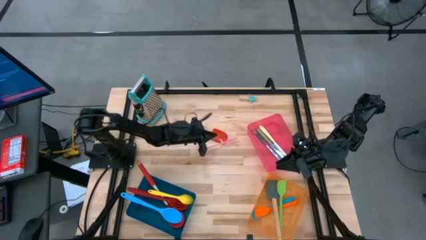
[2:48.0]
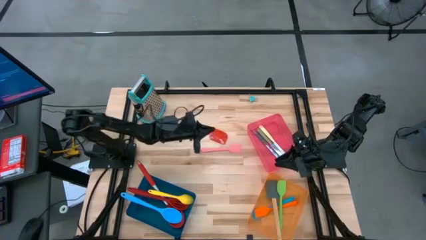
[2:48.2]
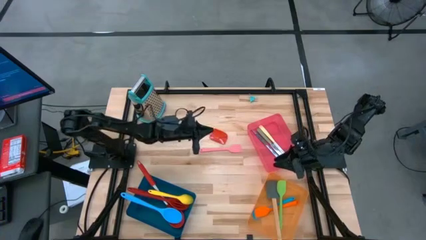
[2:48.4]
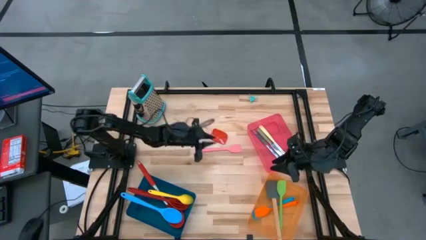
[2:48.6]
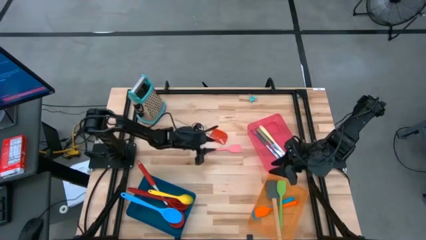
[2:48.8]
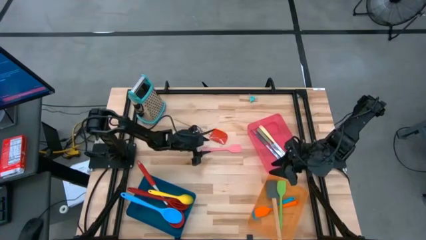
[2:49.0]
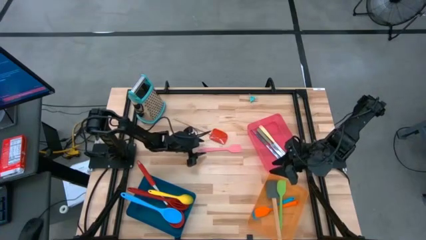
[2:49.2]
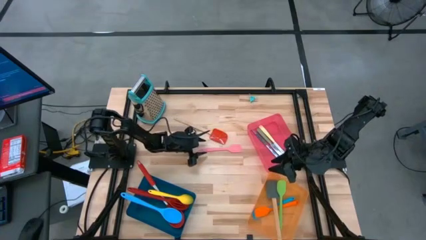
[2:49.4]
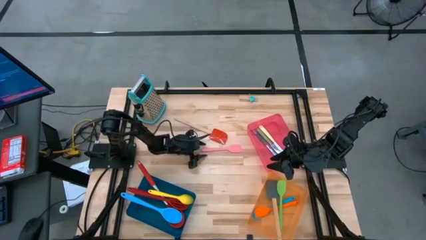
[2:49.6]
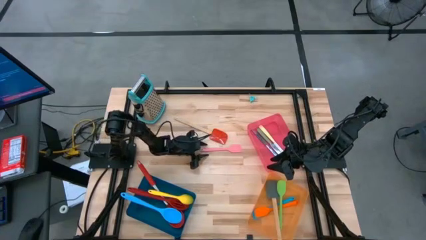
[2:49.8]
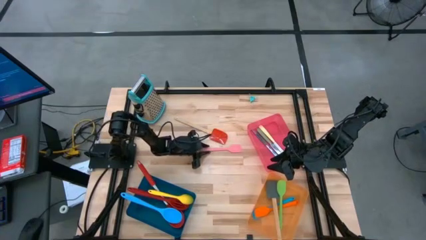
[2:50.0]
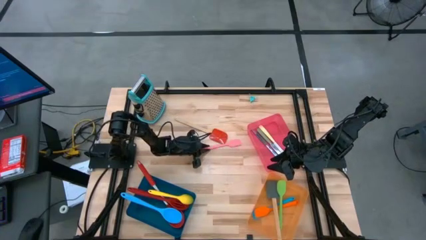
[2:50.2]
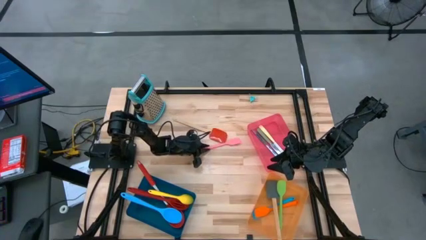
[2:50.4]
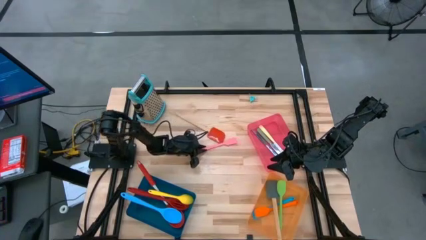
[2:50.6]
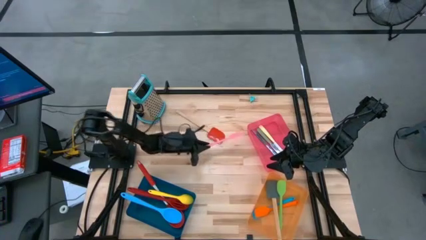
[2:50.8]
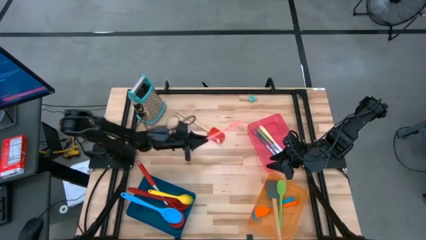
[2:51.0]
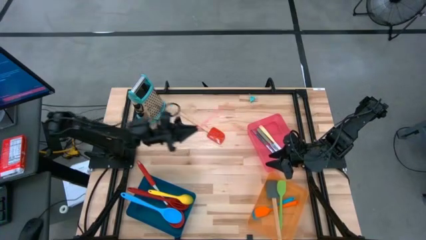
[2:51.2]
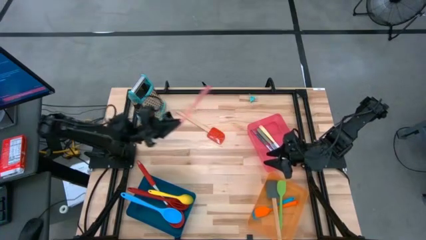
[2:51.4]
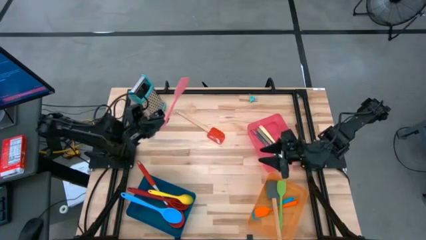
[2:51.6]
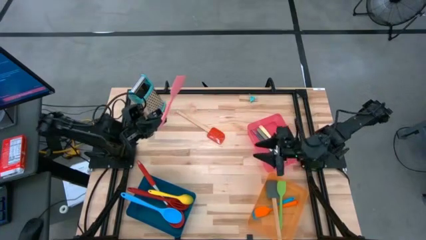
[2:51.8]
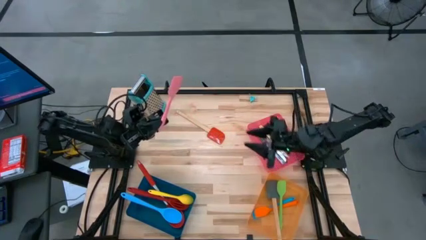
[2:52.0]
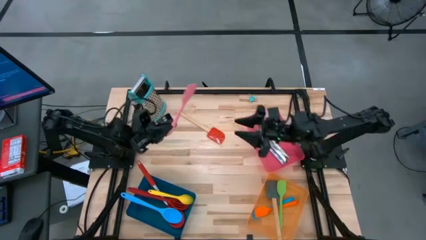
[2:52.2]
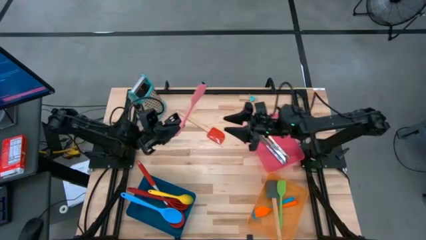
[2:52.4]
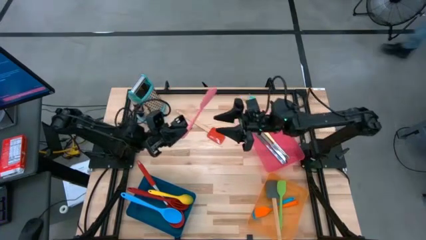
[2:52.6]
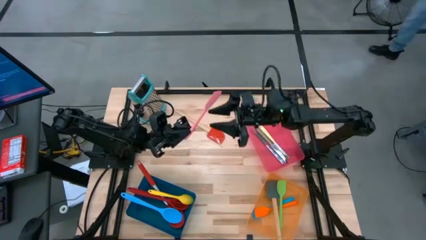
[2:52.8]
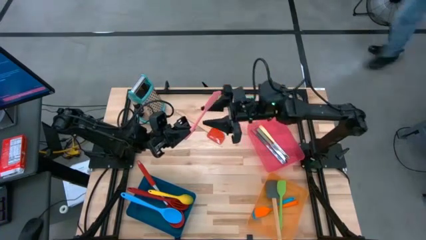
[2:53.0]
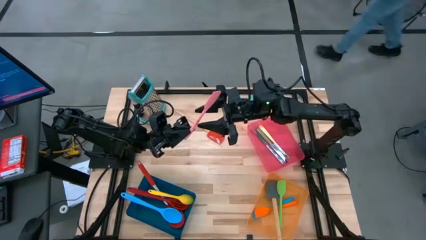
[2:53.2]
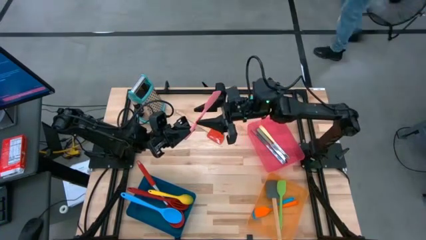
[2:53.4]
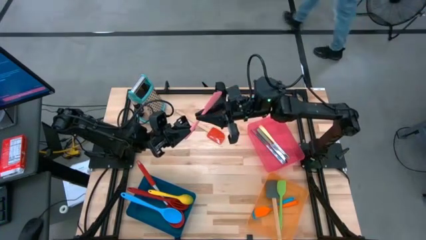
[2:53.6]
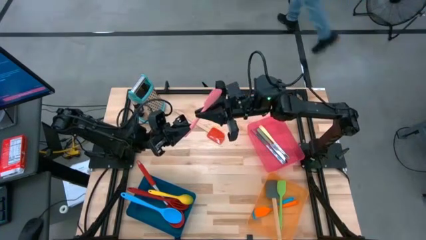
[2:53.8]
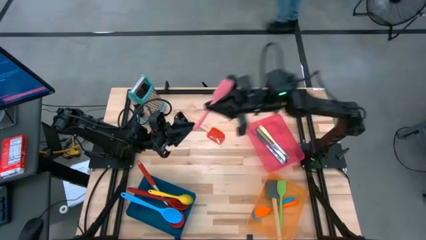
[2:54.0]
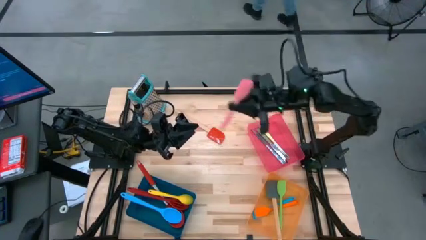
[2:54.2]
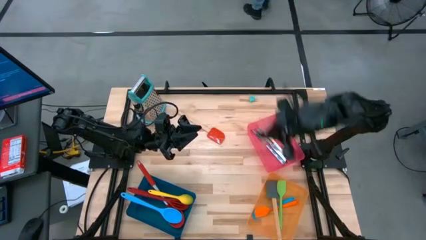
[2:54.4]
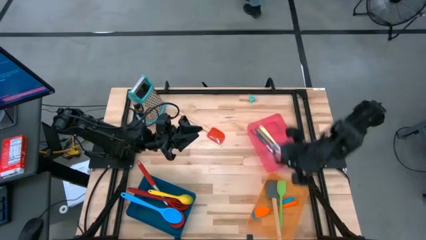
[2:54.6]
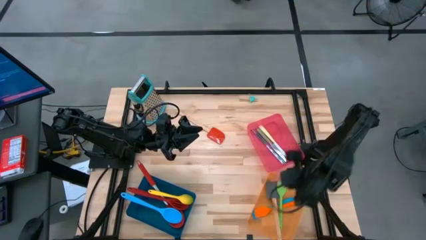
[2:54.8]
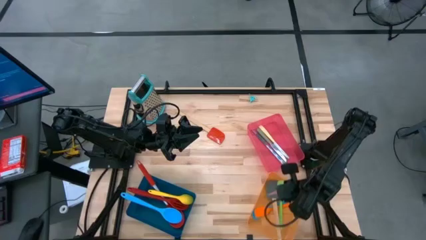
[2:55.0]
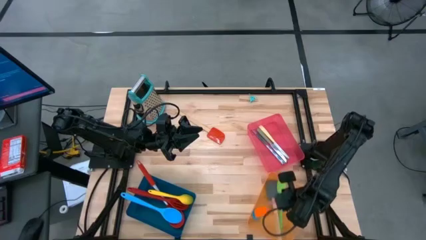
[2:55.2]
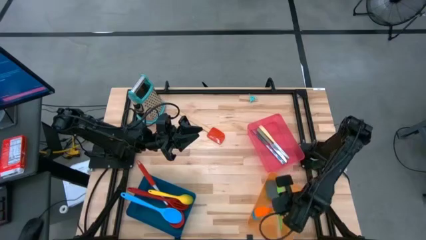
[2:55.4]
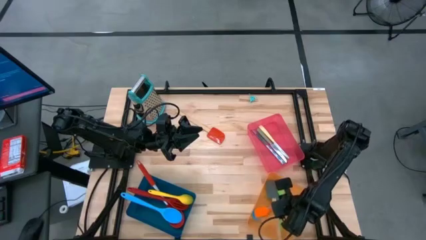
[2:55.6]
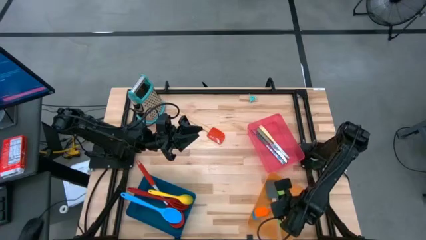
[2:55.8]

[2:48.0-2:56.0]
Task: Pick & Place Kitchen Items
Put the pink spatula into the orange bin

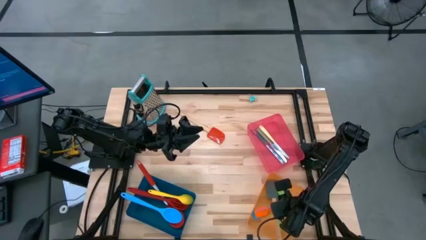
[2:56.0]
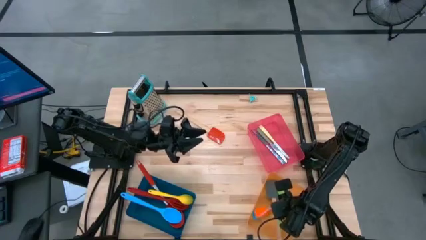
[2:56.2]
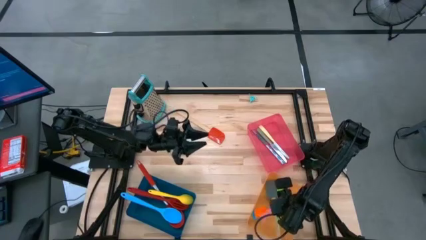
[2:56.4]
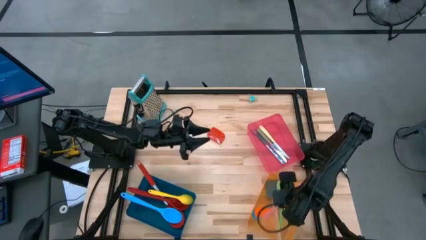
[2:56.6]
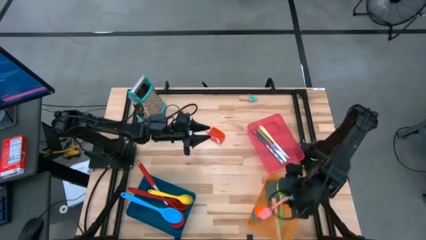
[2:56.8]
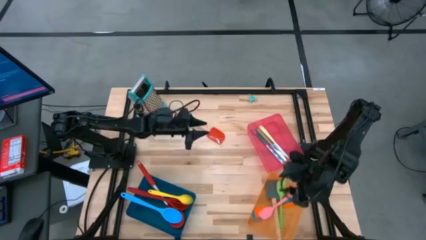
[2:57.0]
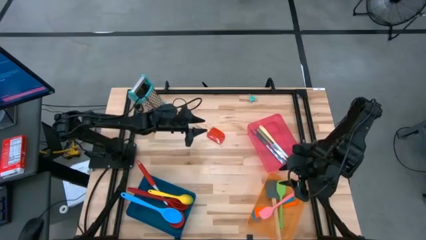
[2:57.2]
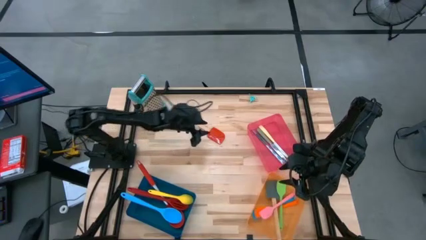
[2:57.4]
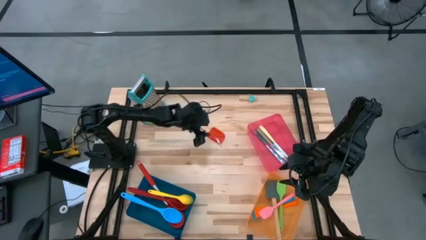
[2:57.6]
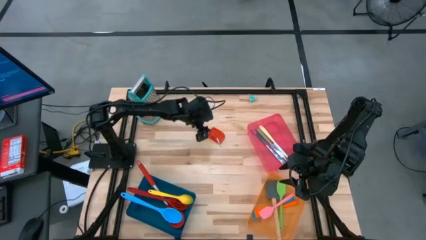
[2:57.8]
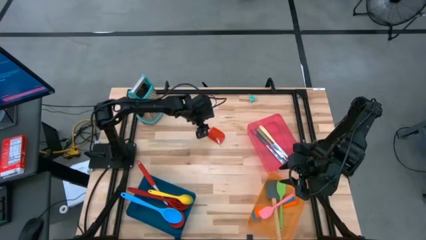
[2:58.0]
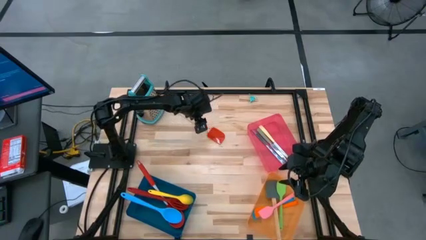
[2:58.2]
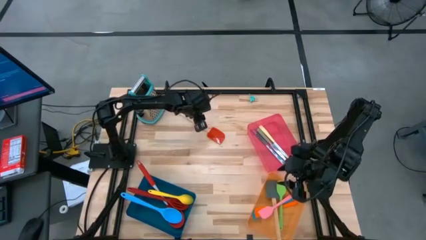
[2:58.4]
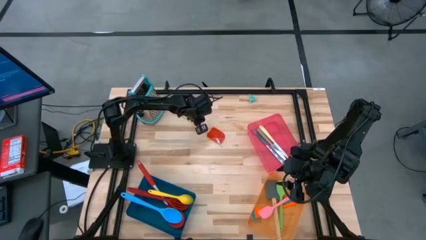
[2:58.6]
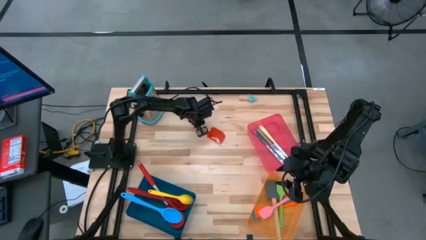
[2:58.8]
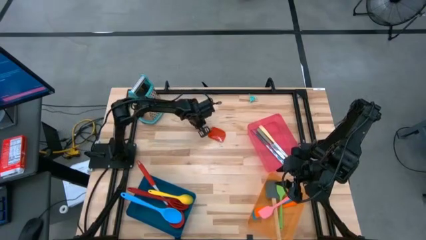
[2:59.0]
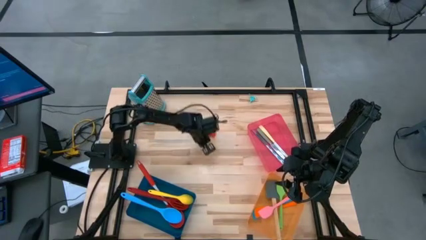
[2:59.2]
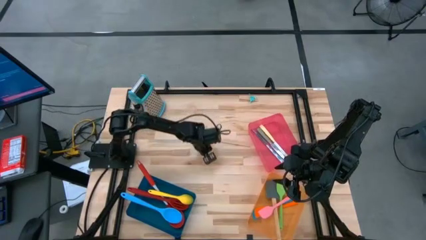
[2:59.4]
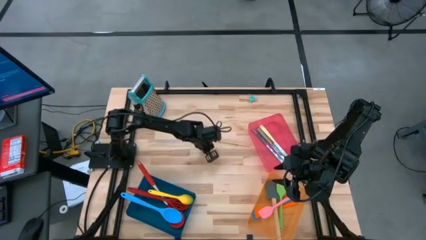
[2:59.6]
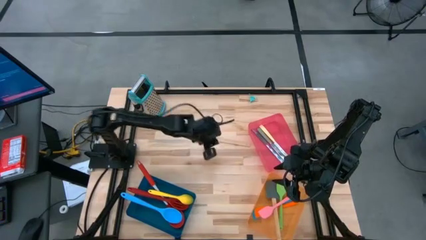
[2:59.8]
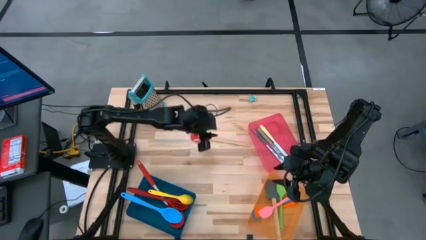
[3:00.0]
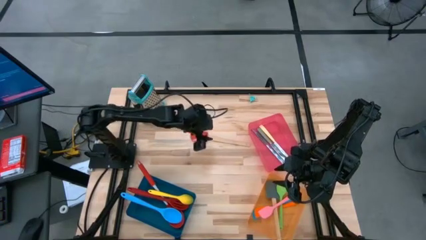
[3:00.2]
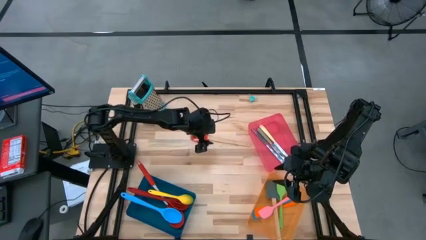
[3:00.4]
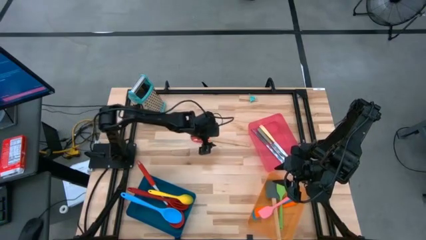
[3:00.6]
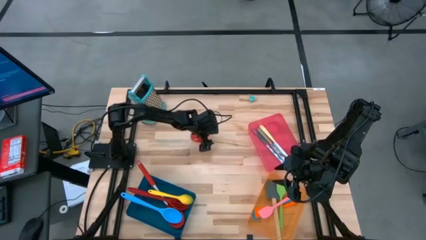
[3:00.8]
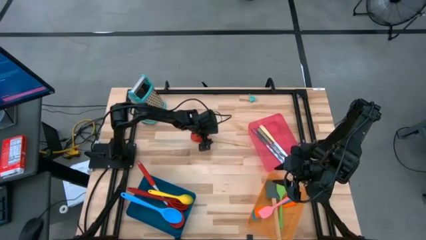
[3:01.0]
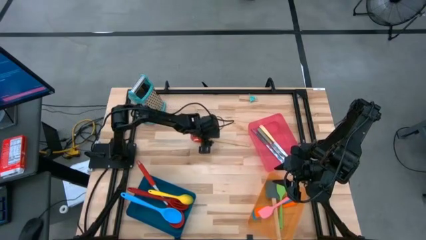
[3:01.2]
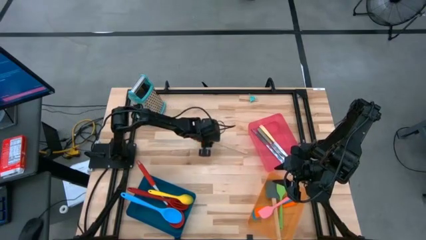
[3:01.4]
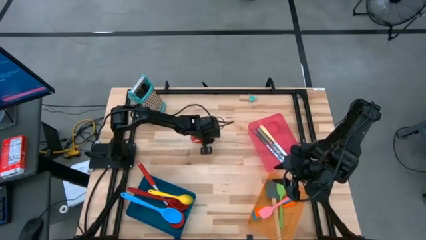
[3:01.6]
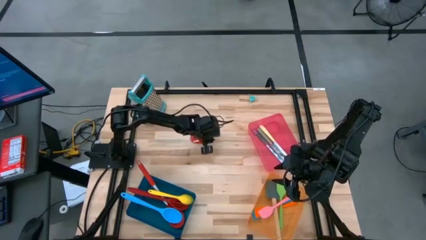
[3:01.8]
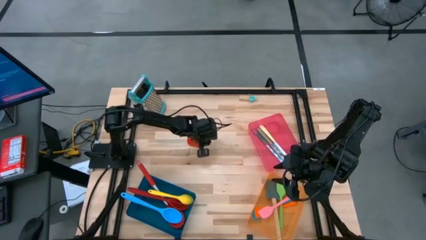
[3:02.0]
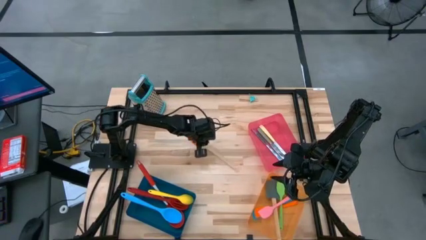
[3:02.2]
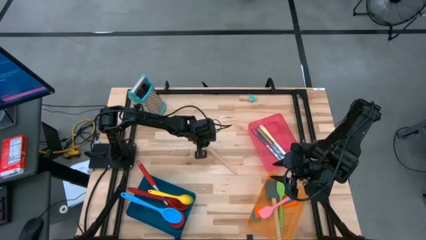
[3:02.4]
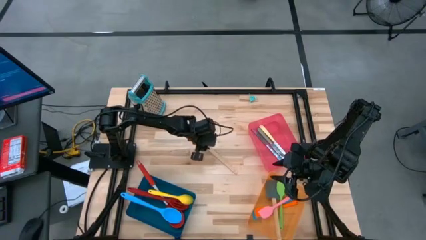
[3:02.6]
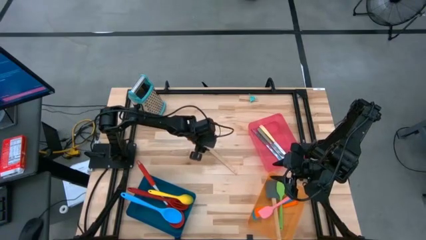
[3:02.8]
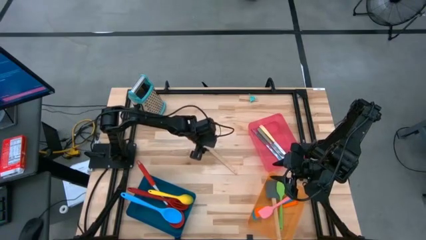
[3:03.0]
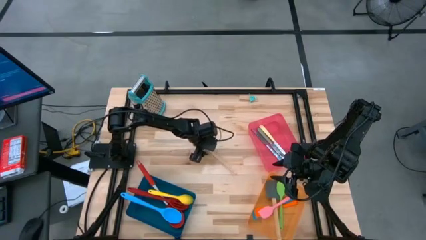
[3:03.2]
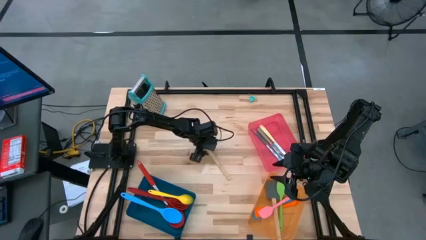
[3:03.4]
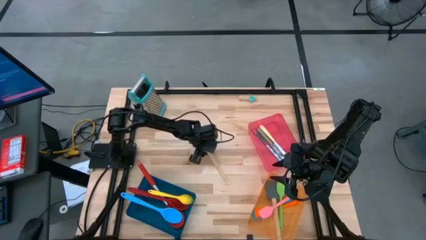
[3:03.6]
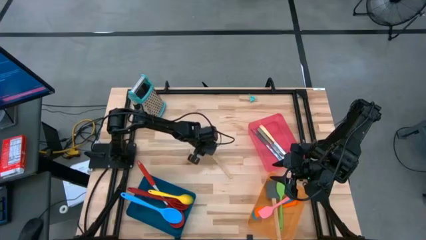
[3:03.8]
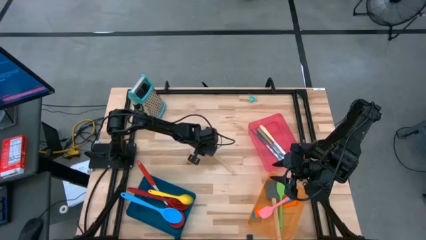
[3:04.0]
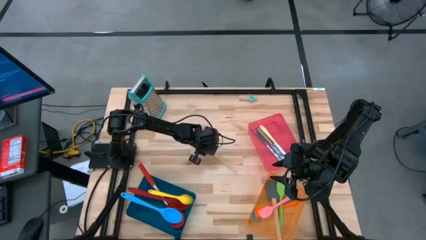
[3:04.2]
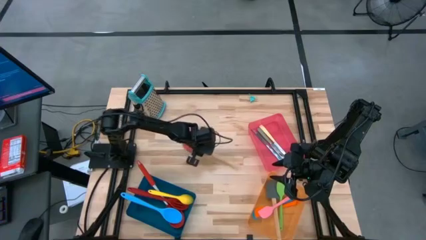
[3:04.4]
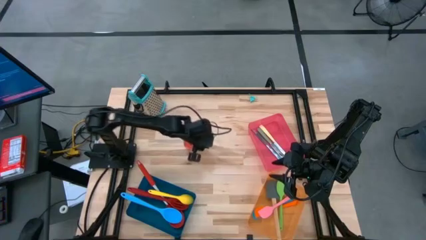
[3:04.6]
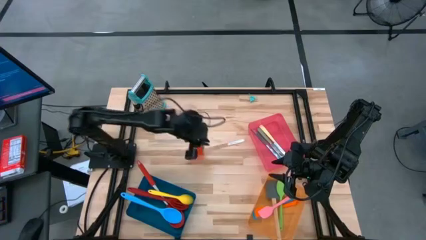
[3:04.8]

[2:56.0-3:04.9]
Put the red spatula into the orange bin
